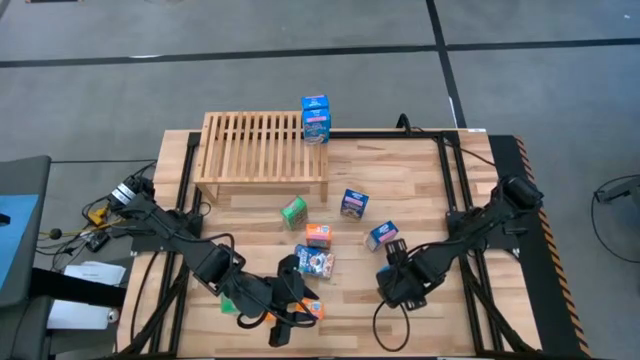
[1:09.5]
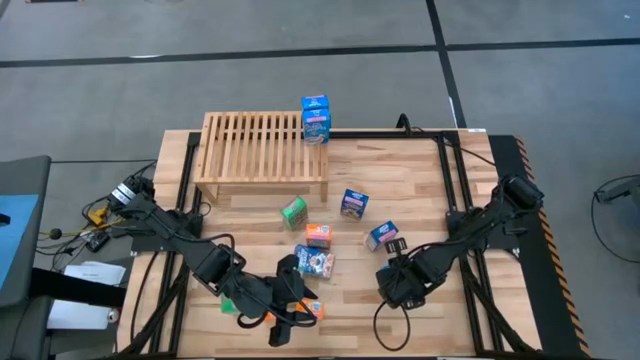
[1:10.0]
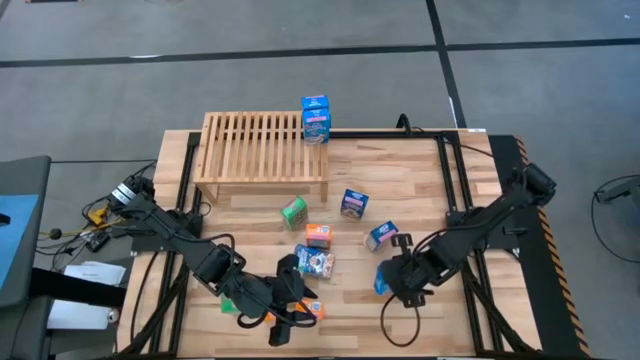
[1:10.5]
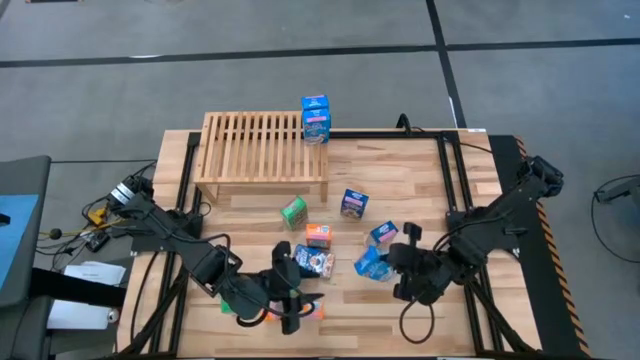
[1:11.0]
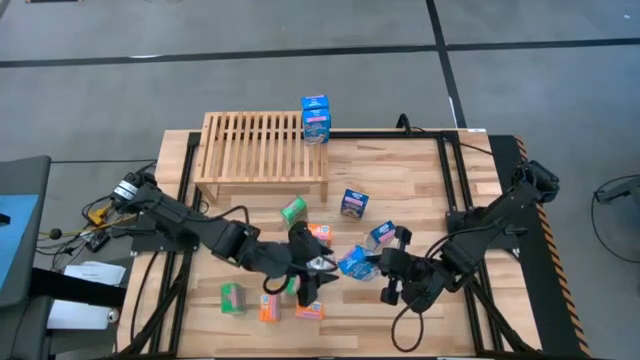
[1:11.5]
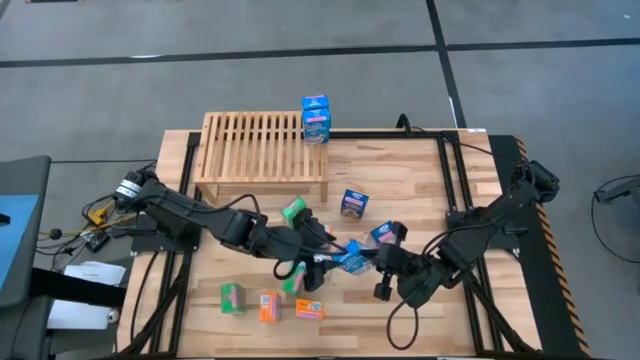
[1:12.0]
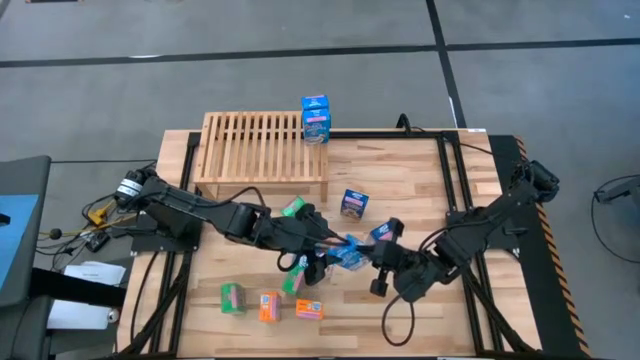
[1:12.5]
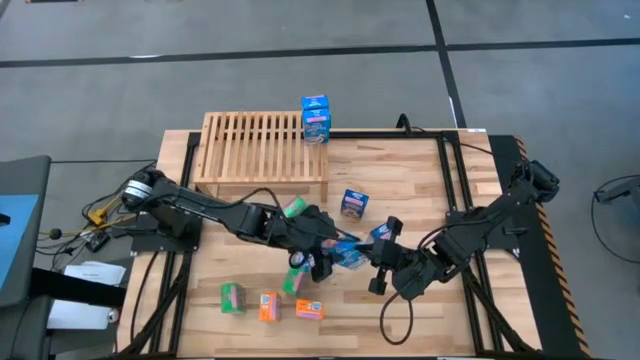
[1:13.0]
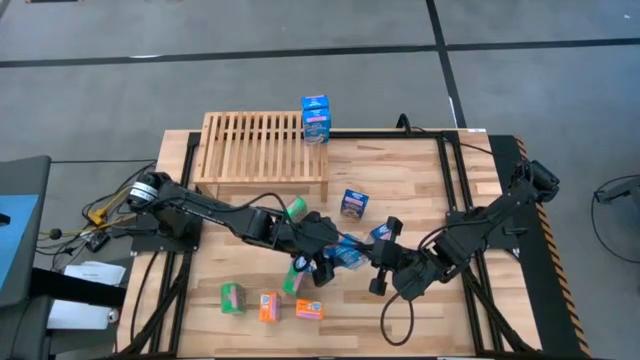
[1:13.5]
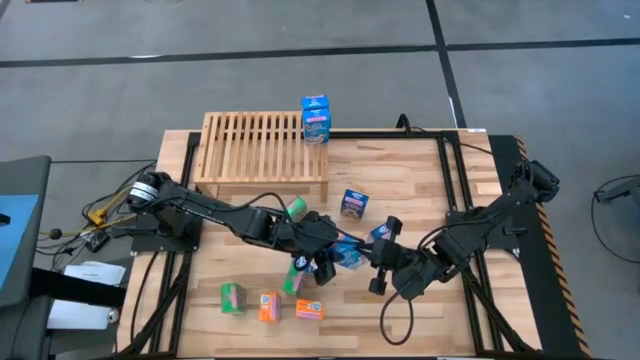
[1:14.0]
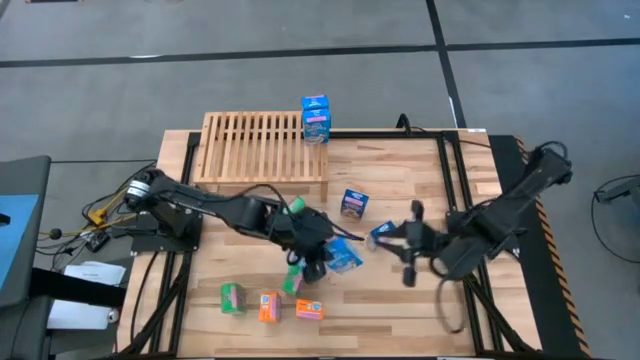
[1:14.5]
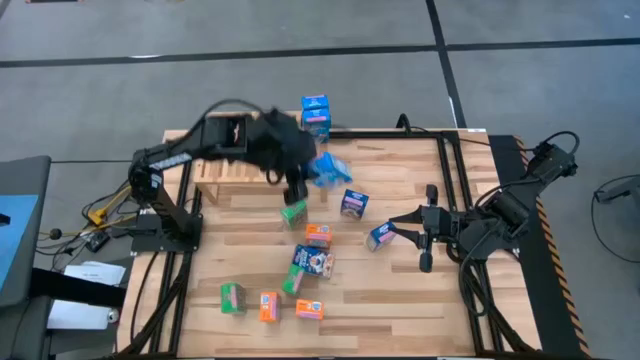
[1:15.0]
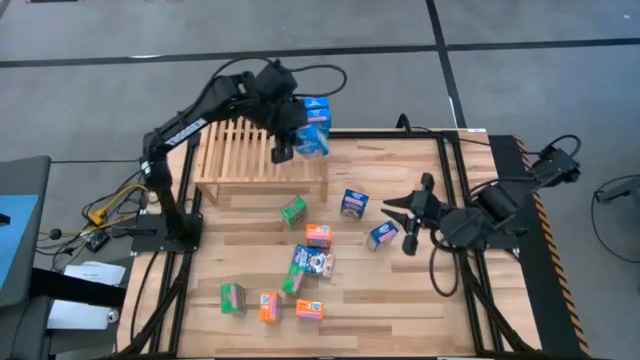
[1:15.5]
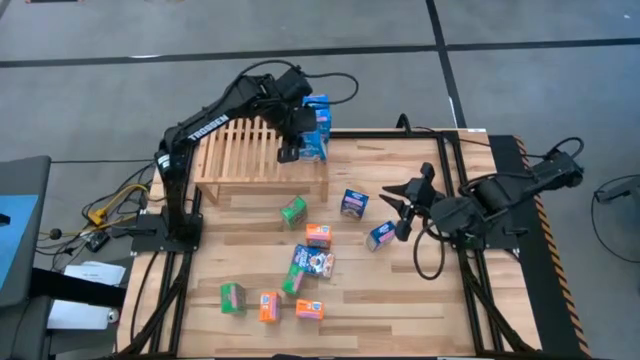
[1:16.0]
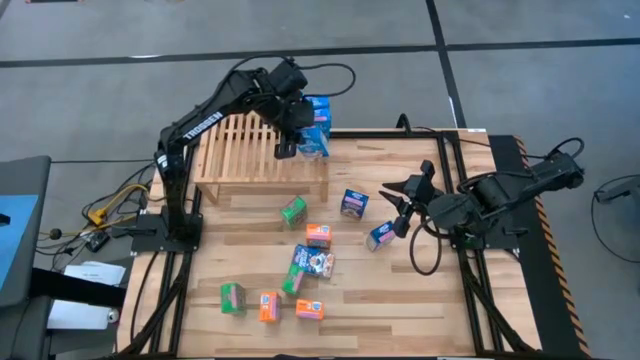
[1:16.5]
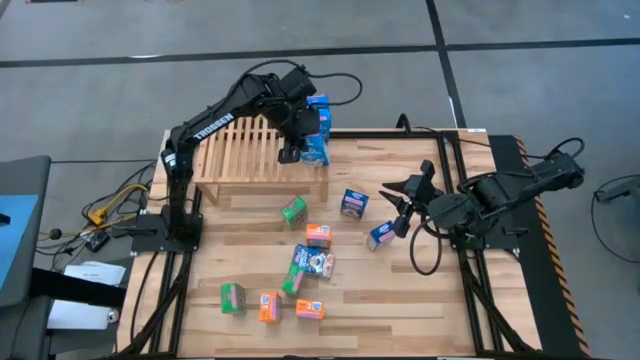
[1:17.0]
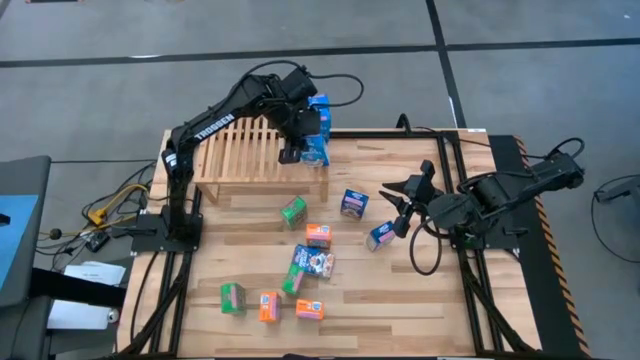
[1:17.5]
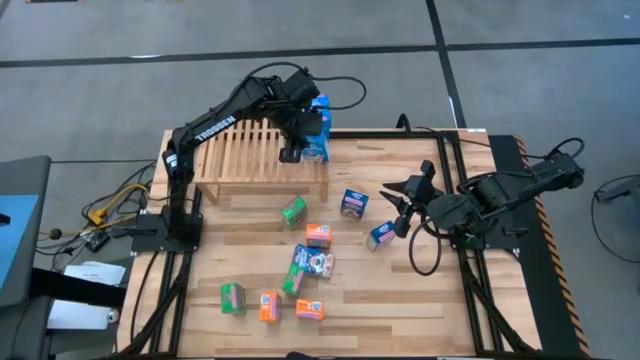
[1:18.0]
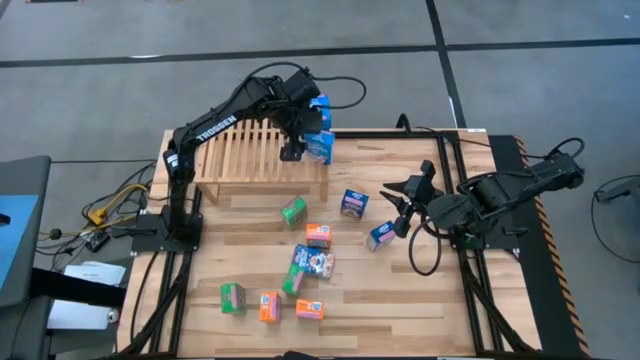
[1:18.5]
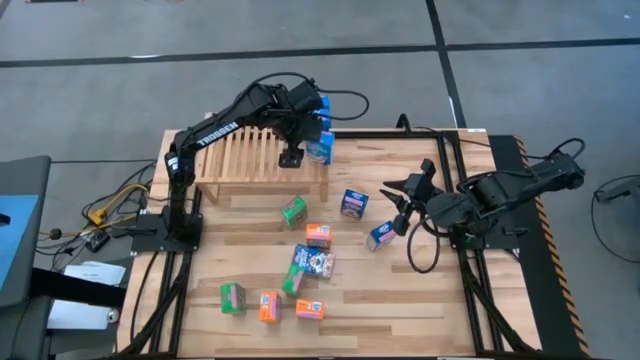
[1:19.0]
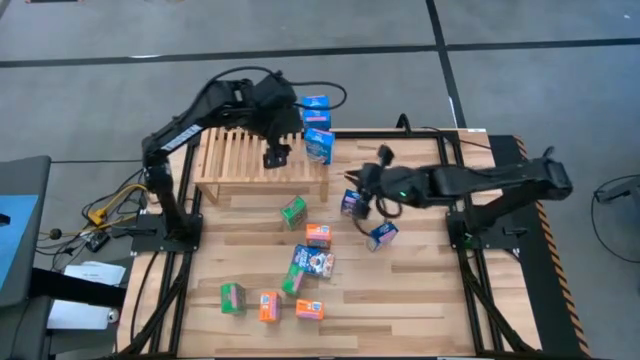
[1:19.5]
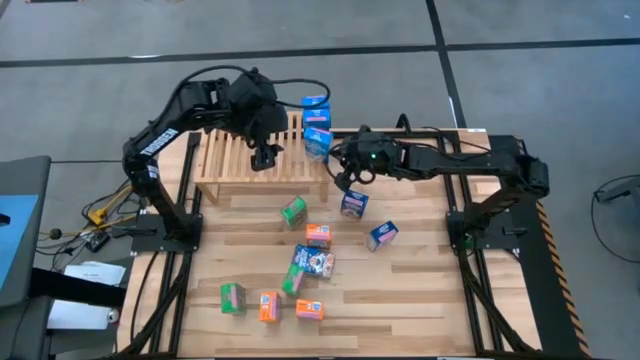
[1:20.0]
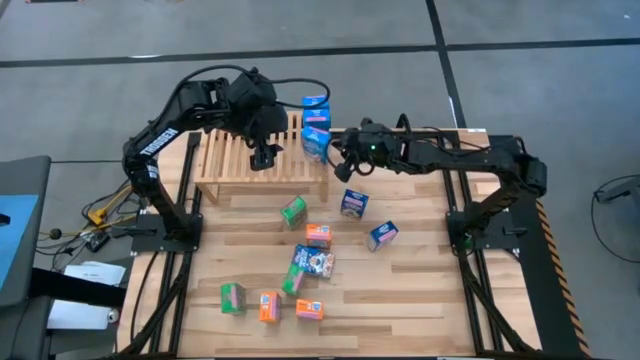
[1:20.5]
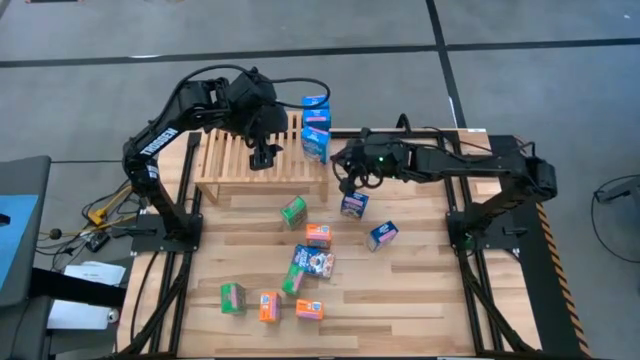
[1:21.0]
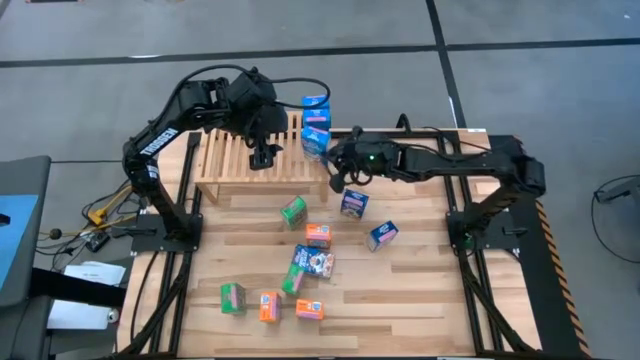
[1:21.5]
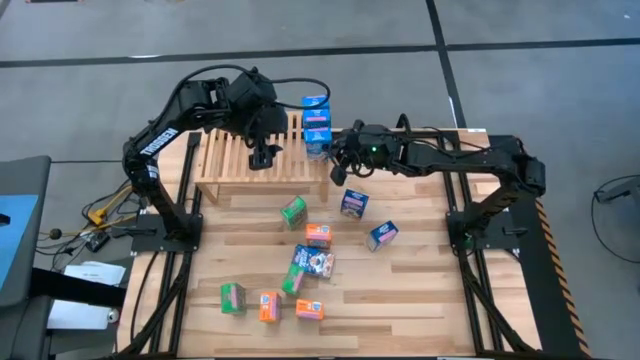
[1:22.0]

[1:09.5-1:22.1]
Task: Stack cereal on shelf
Put the light blue cereal box on the shelf aligned with the other light blue cereal boxes

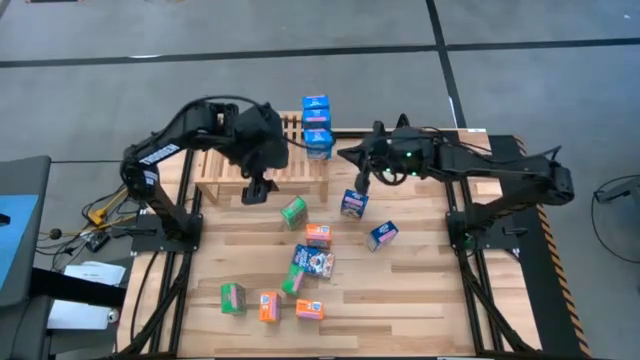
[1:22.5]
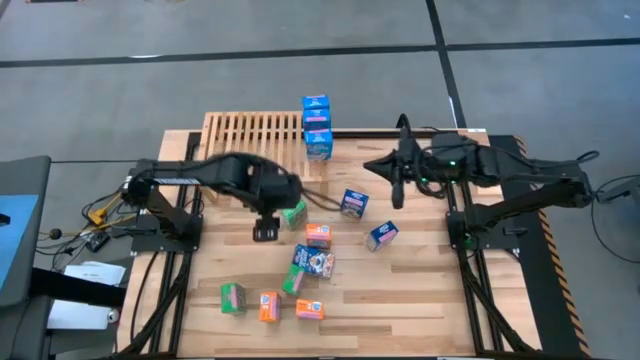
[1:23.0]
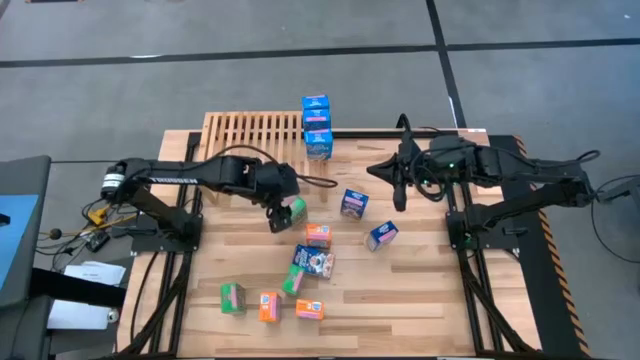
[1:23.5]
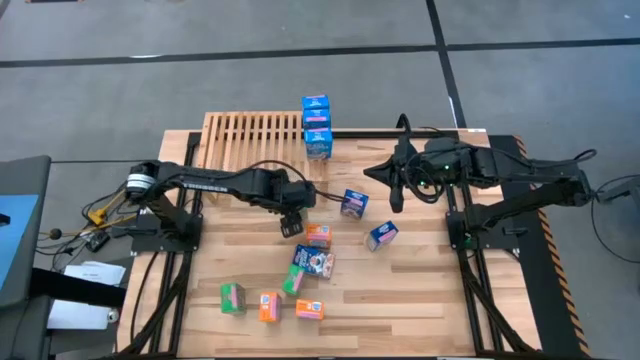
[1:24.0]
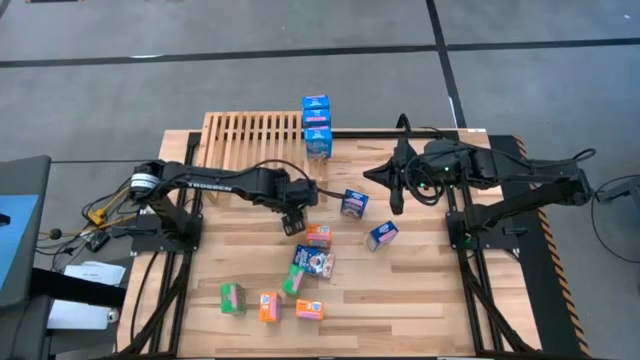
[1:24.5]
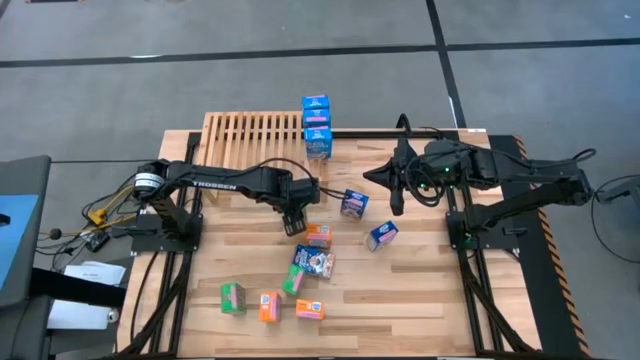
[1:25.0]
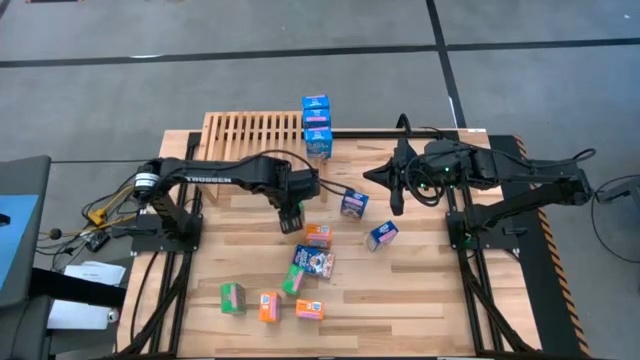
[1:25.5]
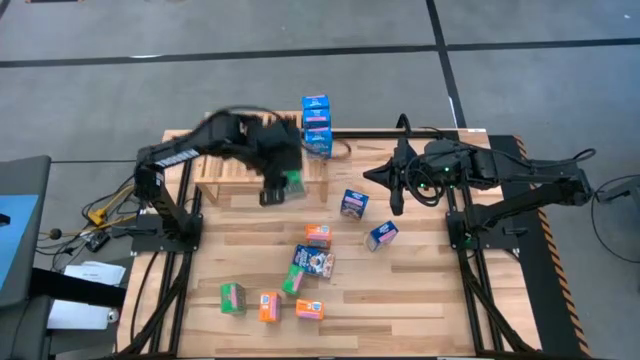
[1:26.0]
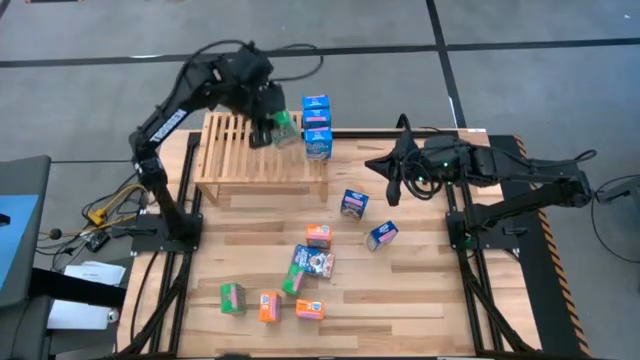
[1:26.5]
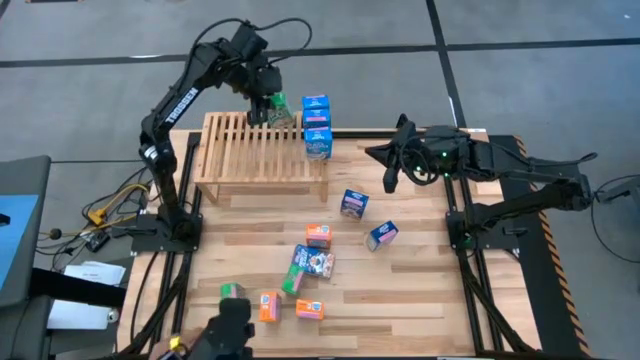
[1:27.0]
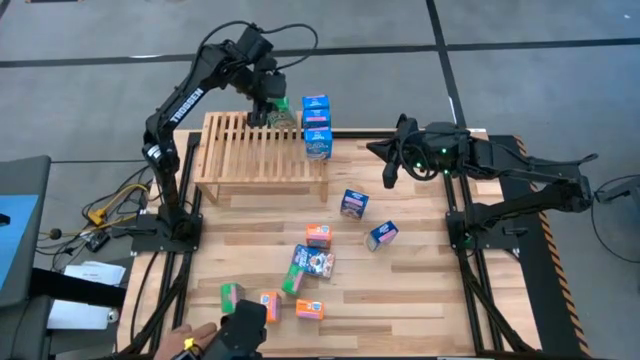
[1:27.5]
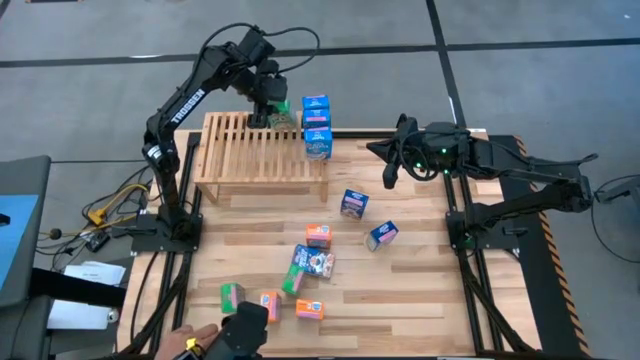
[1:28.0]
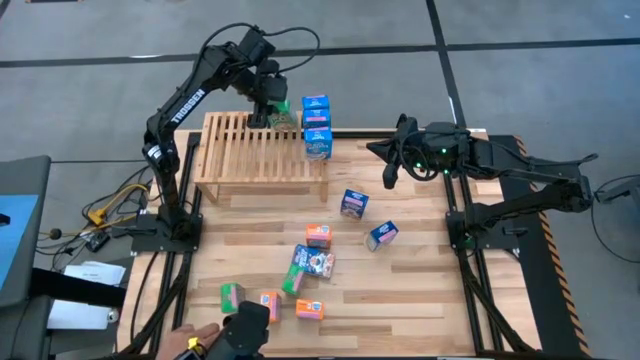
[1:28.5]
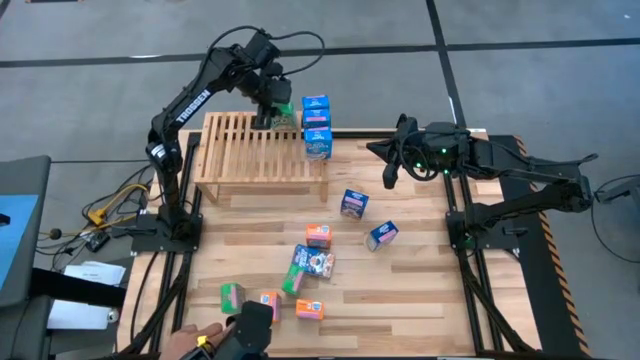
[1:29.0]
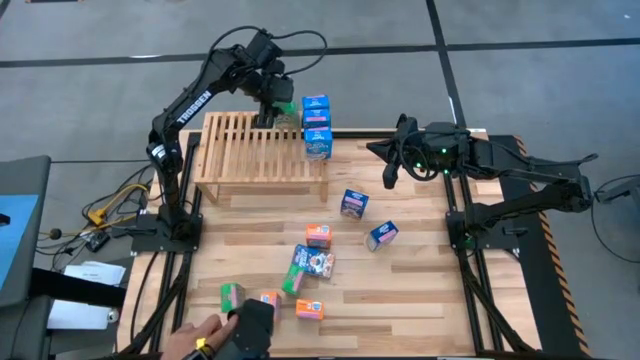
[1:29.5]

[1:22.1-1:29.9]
Put the top green cereal box on the shelf
